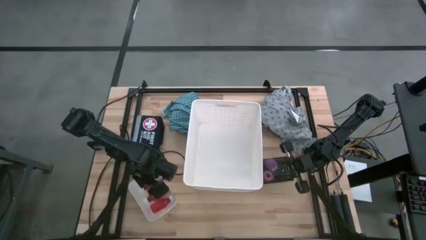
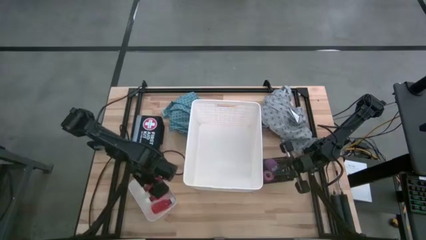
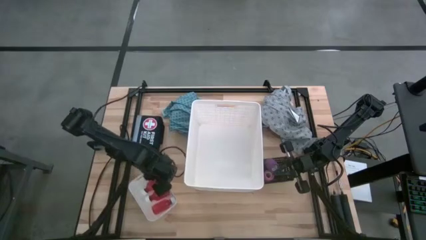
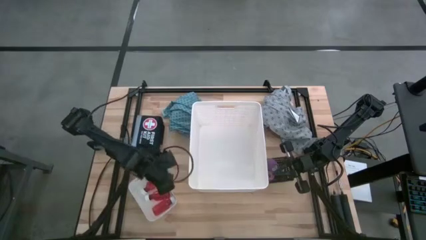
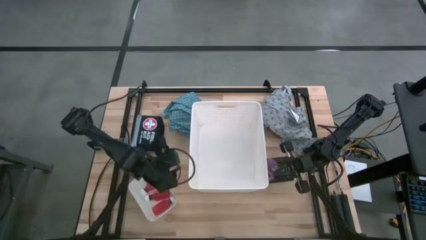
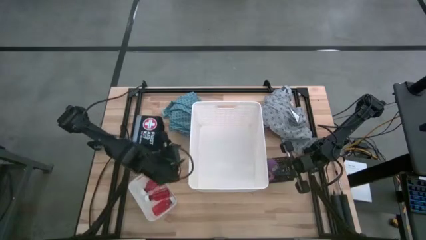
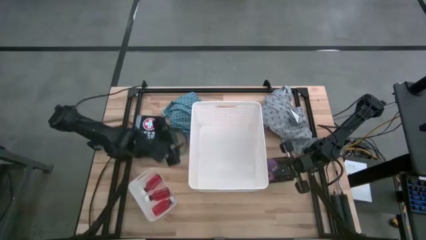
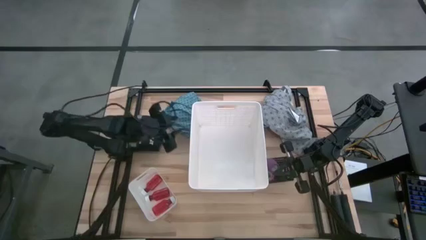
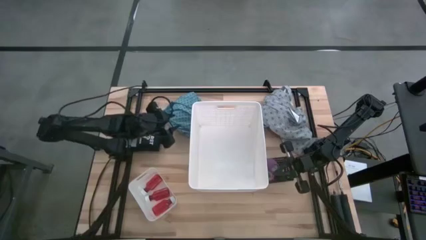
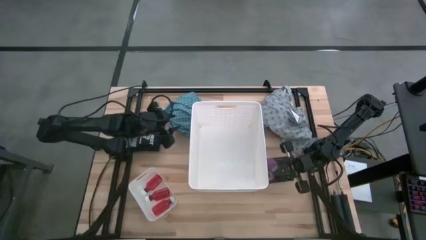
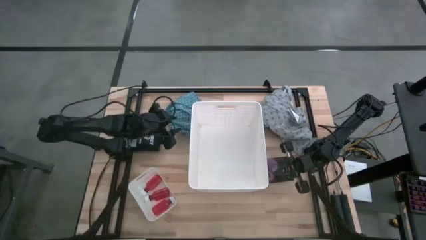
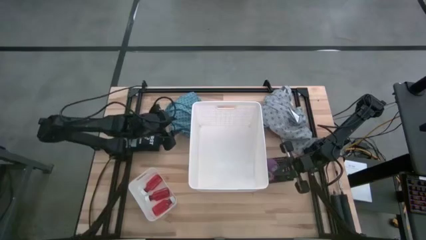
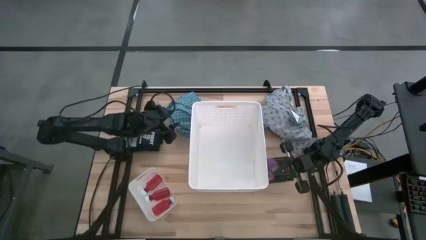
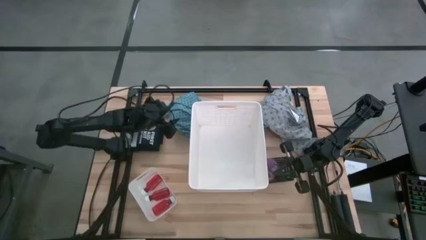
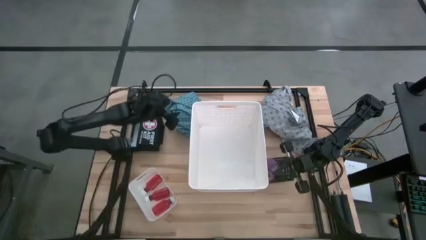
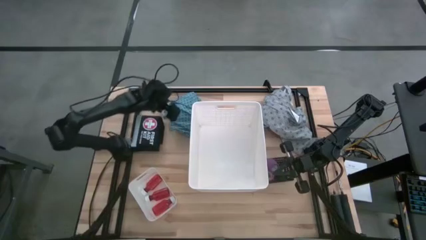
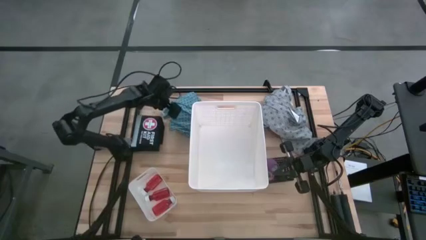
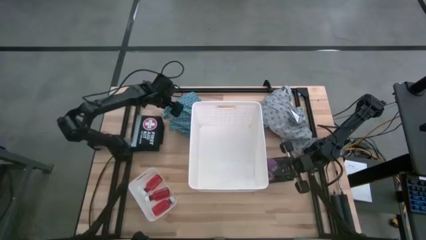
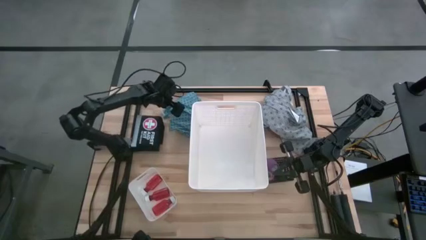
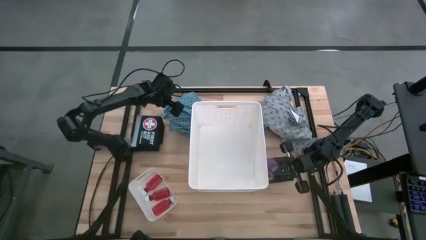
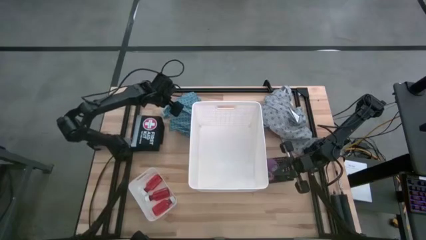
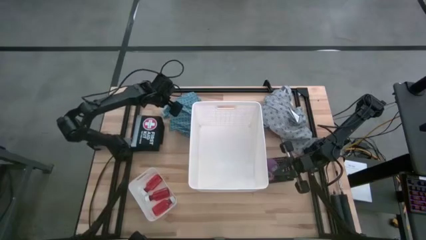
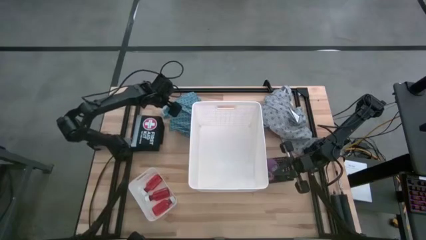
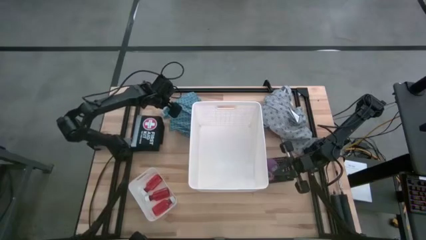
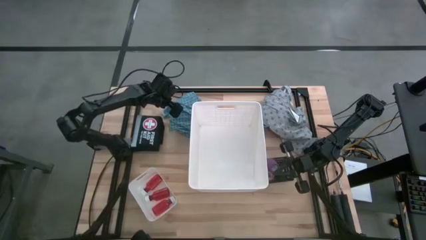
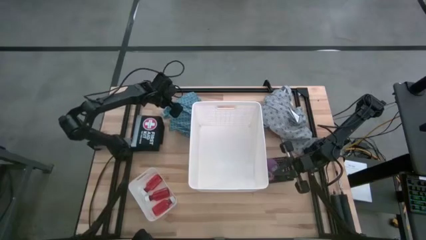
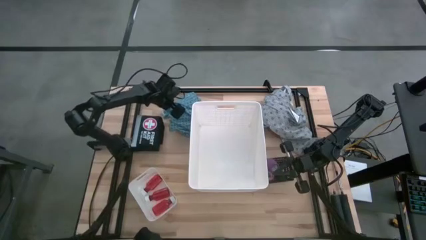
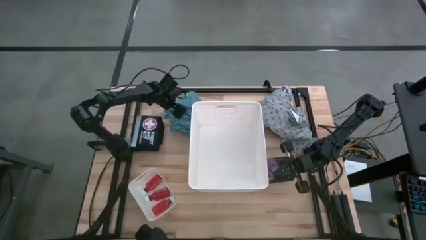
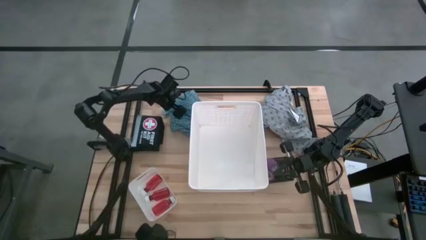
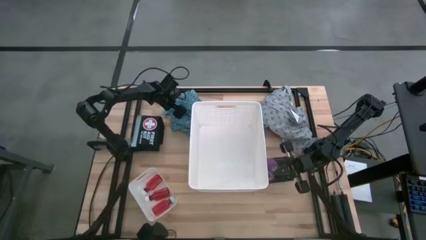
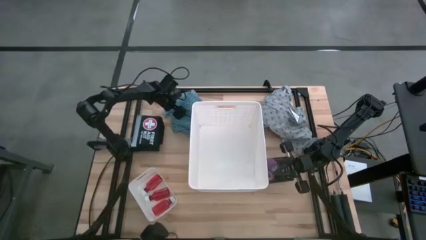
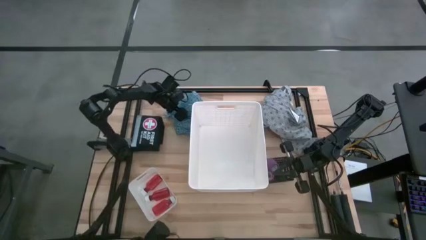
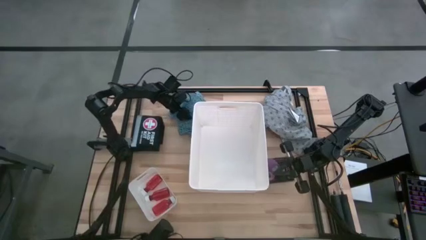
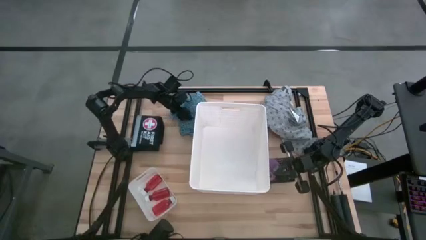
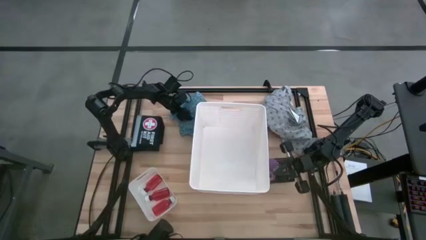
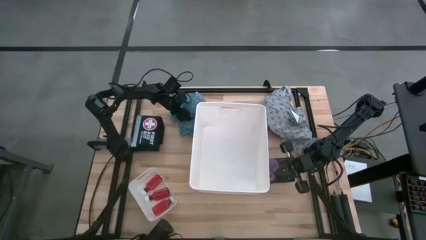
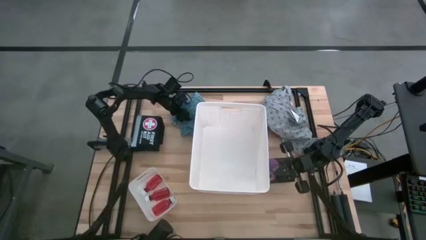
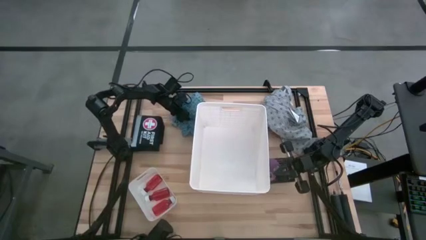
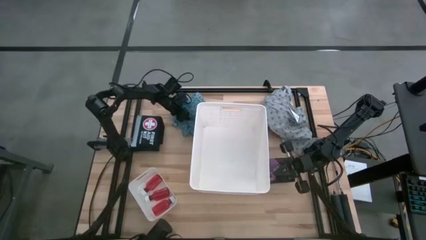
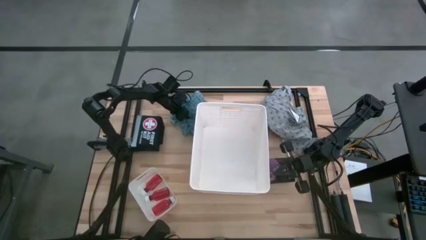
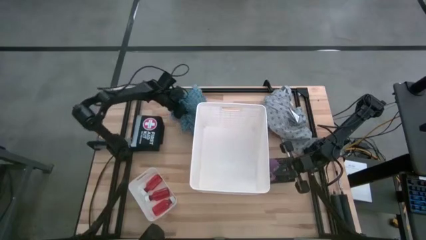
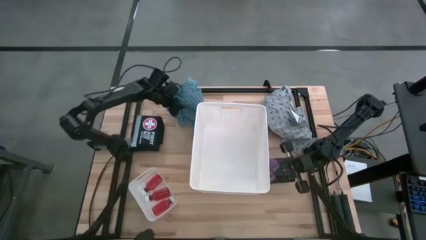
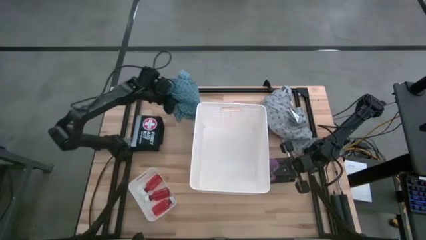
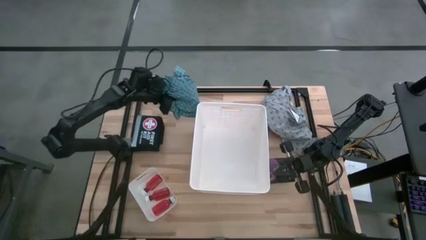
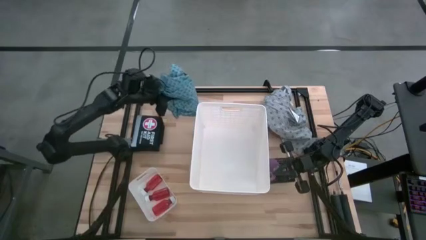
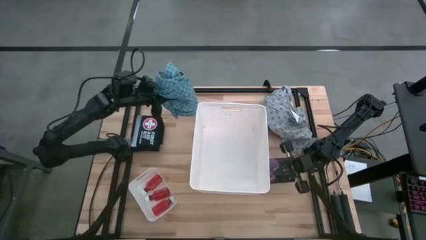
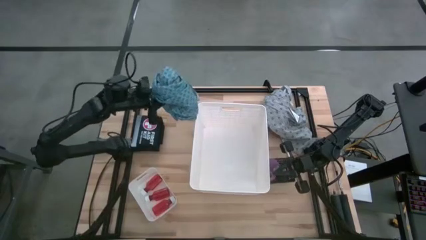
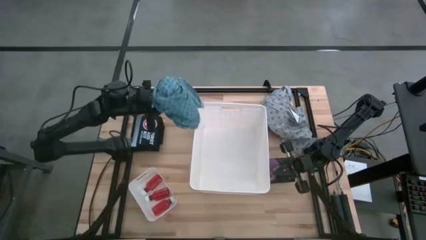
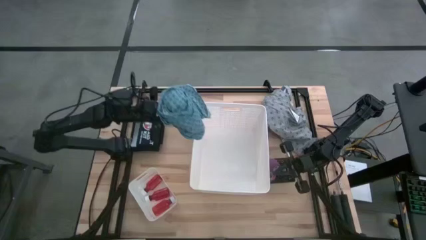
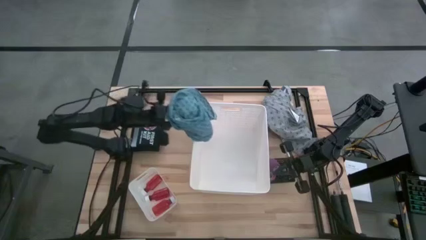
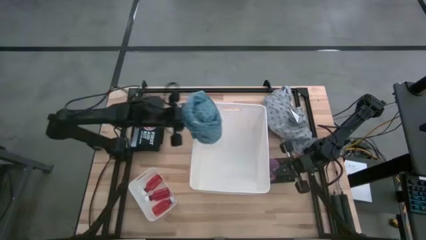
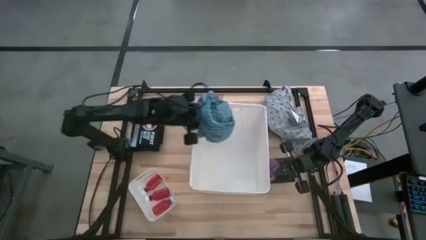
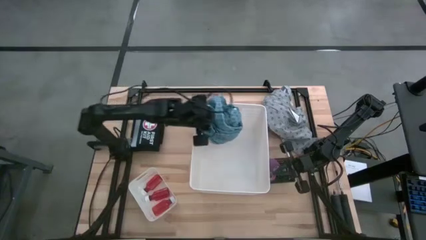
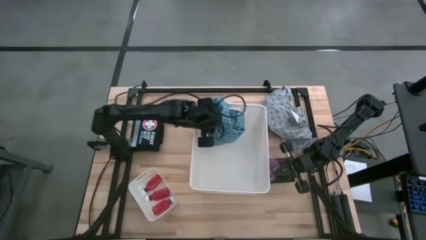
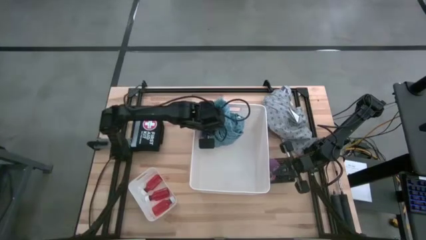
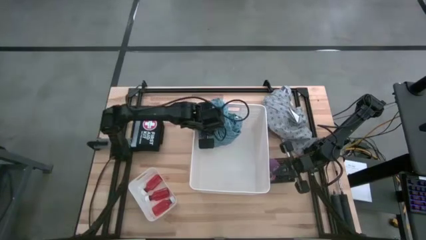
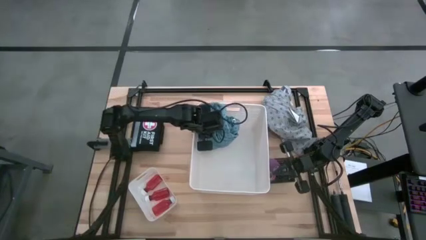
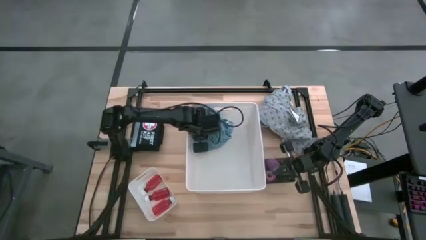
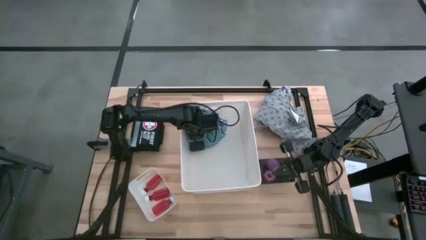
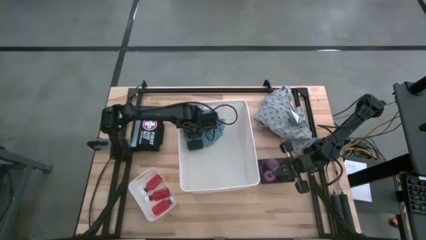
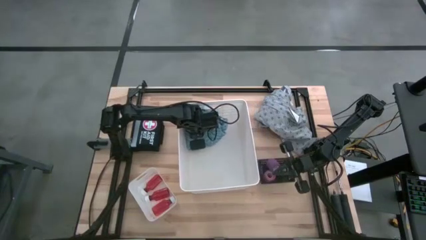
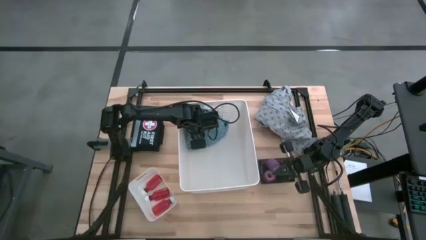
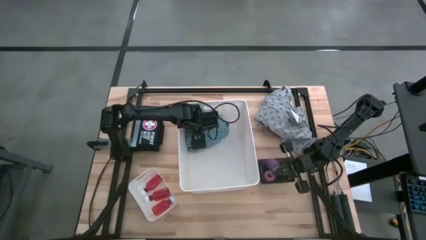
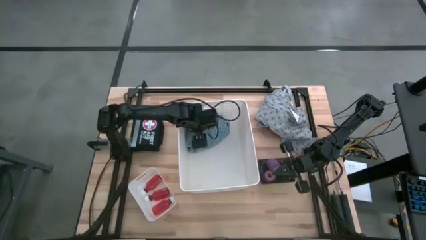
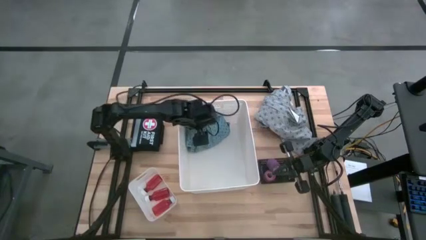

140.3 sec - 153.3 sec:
Task: Pick & place medical supplies in basket/bin
Put the dark blue patient gown into the organizer bin
